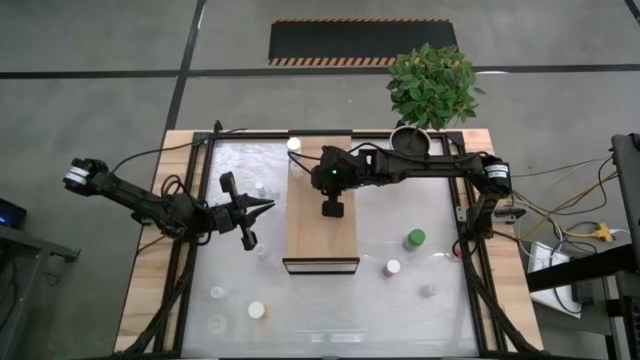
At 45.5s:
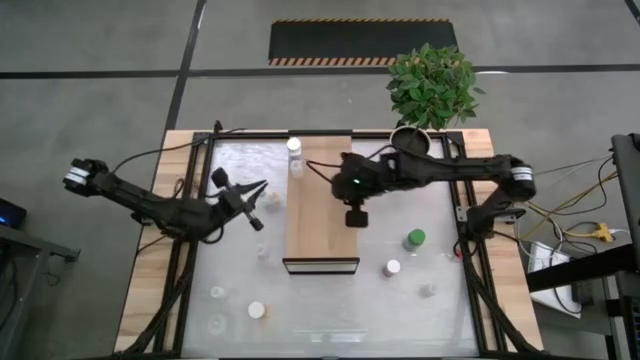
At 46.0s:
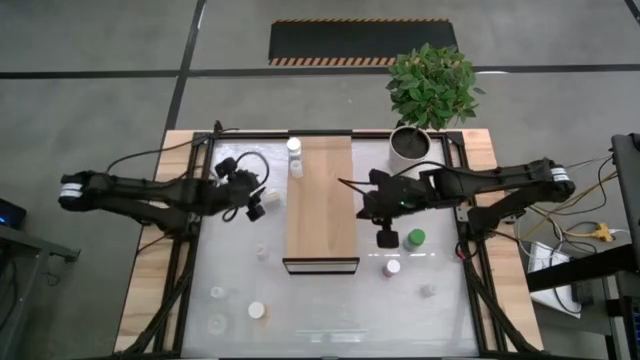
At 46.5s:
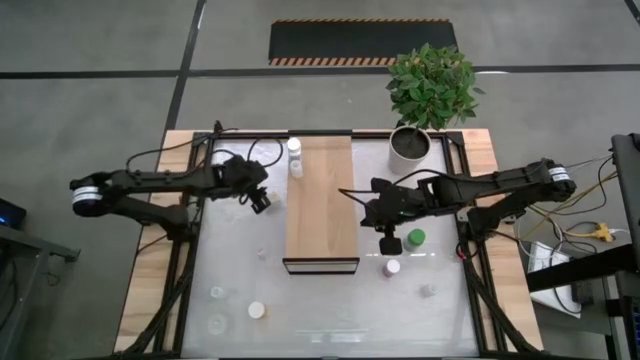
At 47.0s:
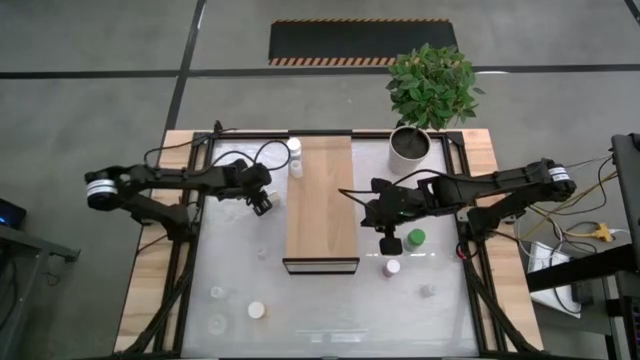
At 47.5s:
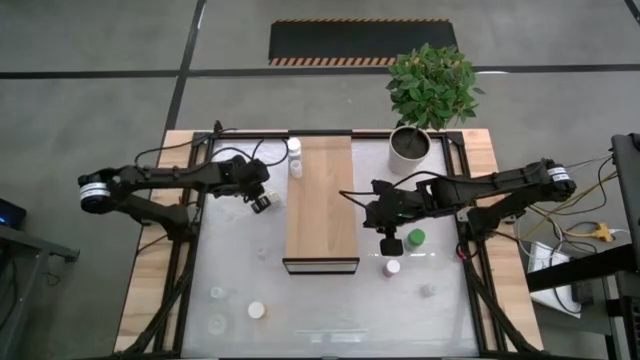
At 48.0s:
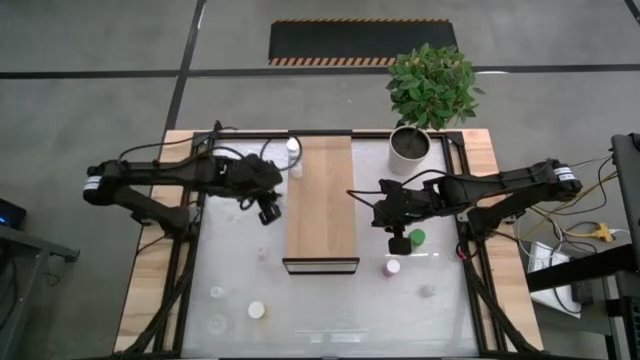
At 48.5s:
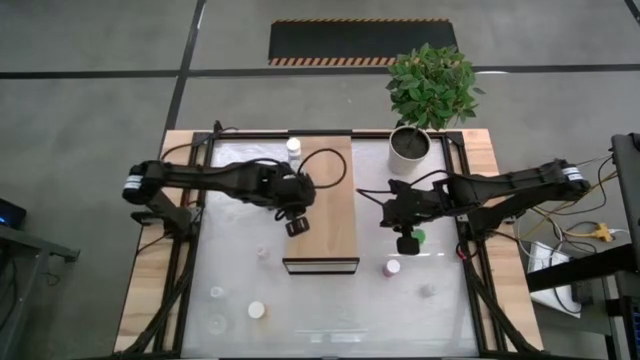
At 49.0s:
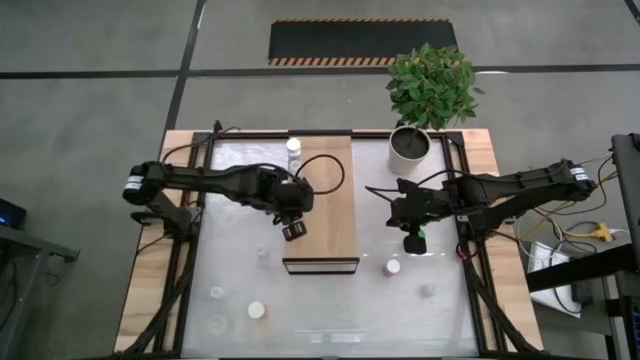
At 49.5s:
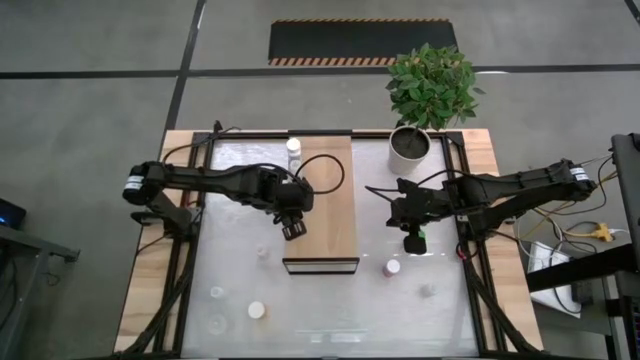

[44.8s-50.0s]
Task: Pick and place medicine bottles onto shelf by color
Put the blue pill bottle on the shelf

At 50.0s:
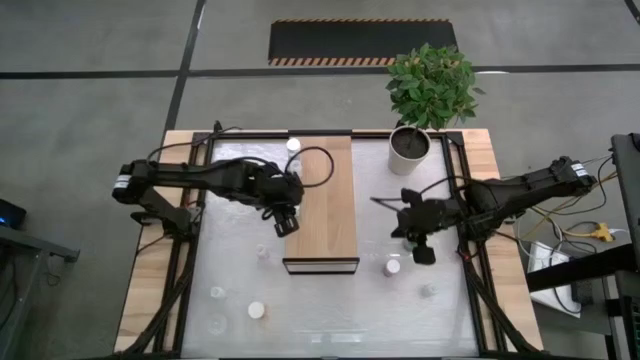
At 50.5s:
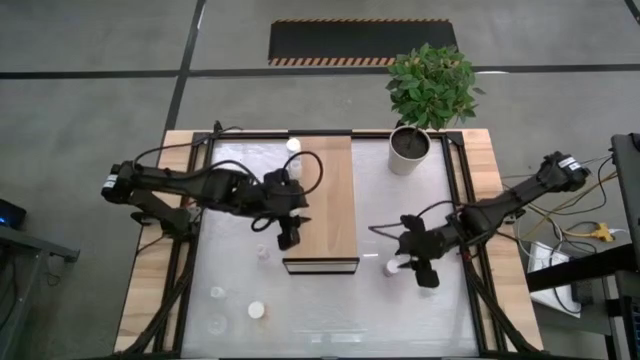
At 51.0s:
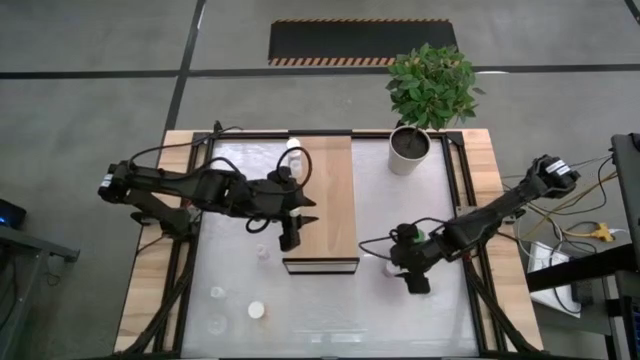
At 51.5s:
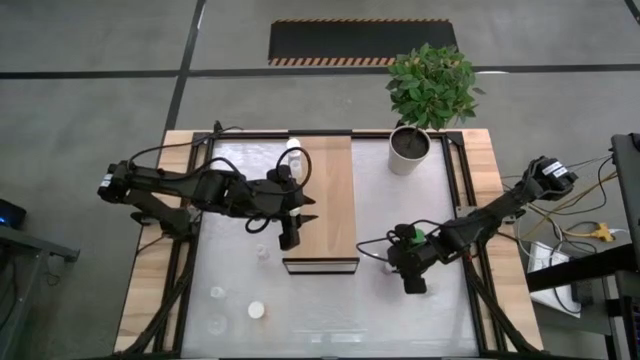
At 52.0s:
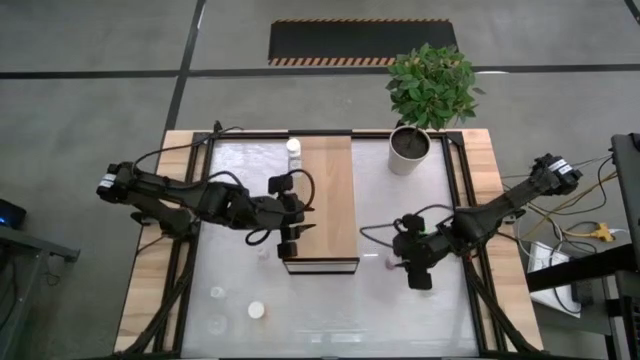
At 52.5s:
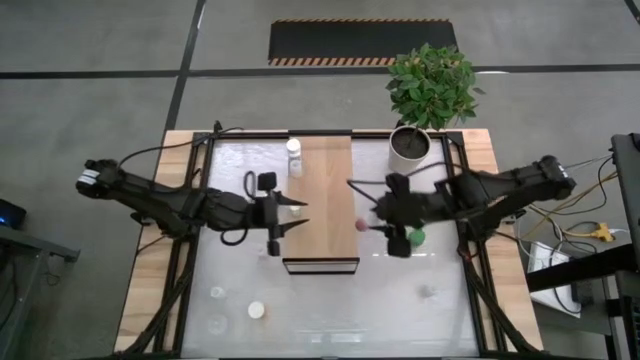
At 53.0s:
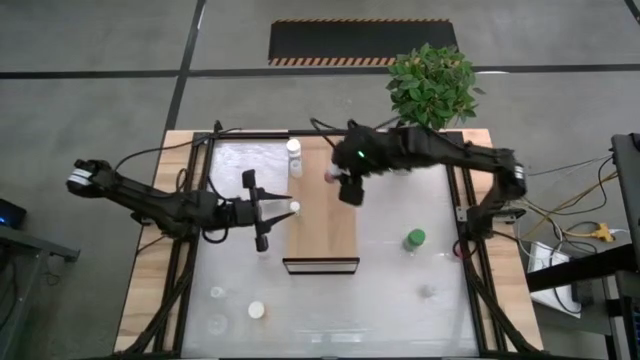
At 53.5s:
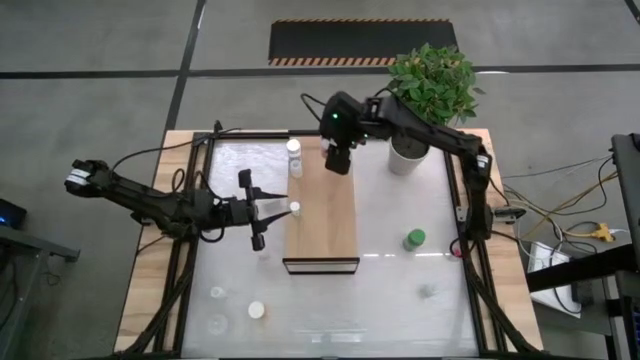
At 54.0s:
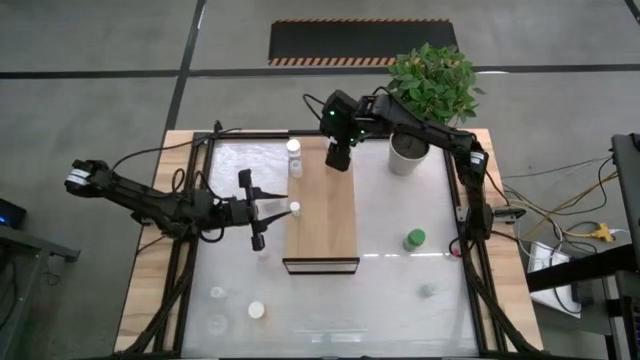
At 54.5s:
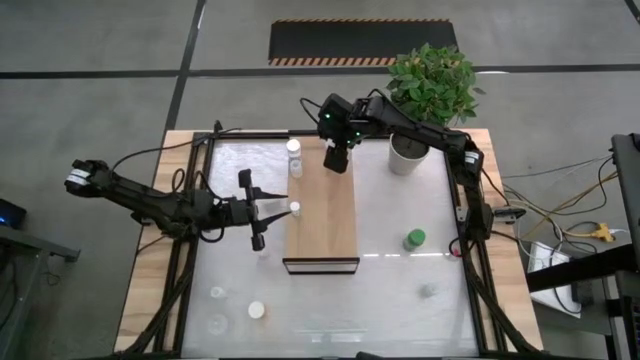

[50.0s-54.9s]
Put the pink pill bottle on the shelf

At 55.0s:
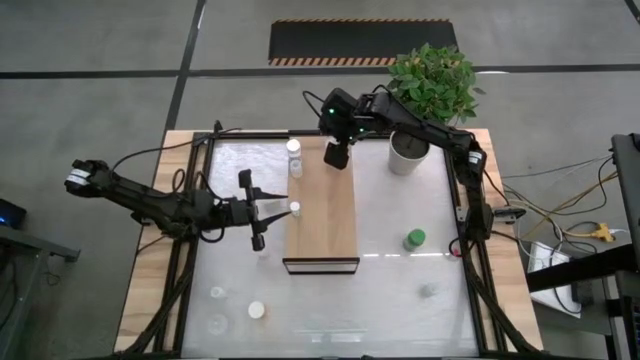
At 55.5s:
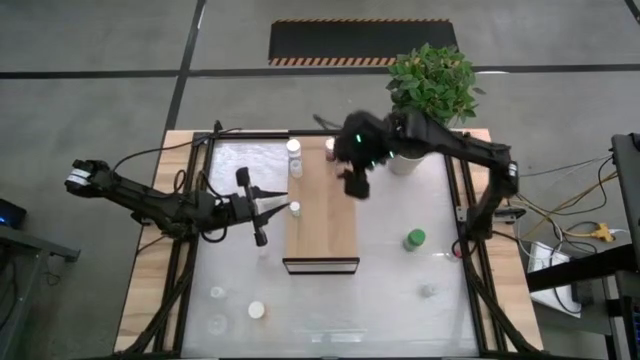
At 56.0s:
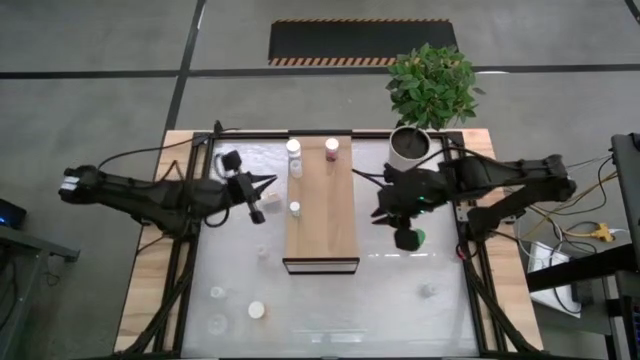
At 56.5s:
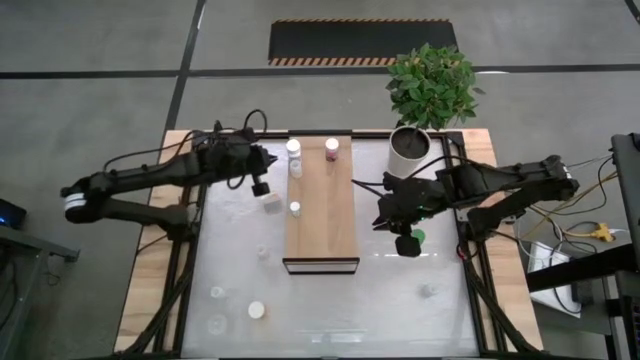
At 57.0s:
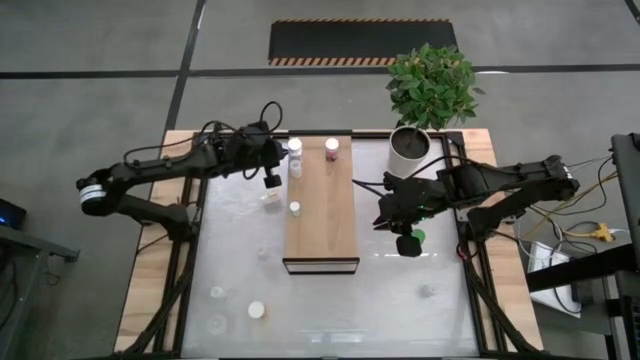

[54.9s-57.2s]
Adjust the blue pill bottle on the shelf

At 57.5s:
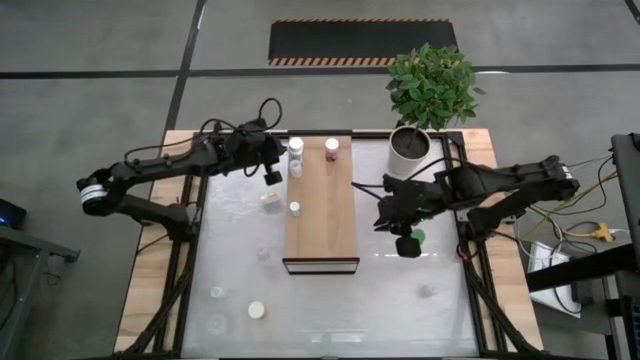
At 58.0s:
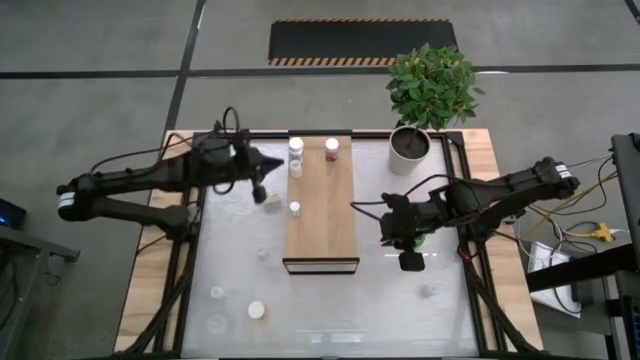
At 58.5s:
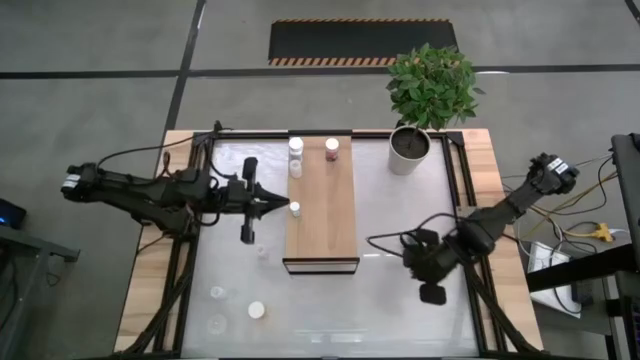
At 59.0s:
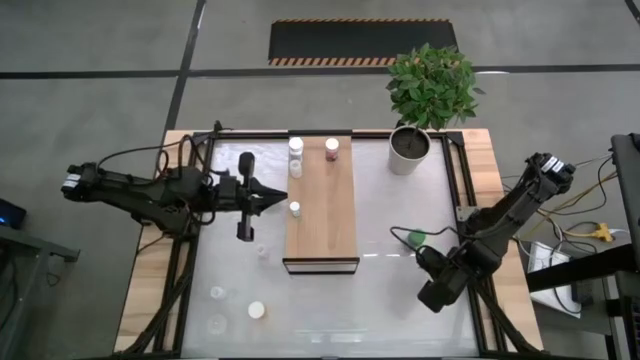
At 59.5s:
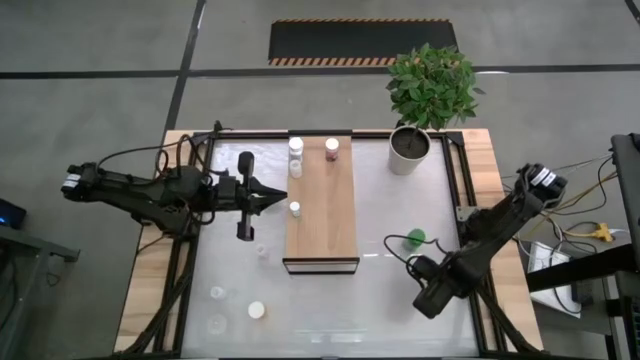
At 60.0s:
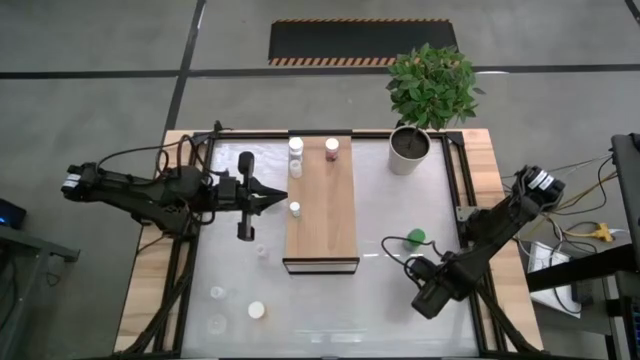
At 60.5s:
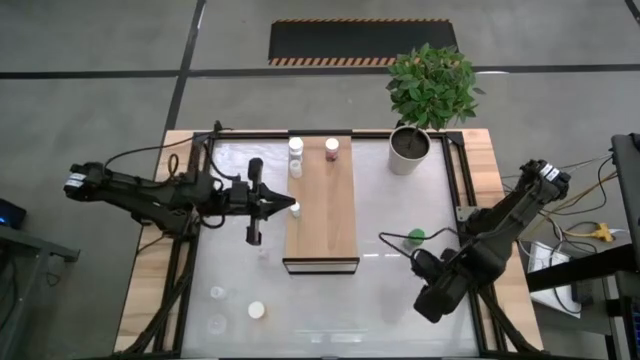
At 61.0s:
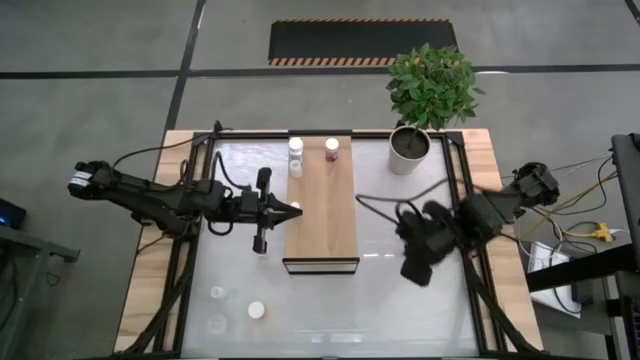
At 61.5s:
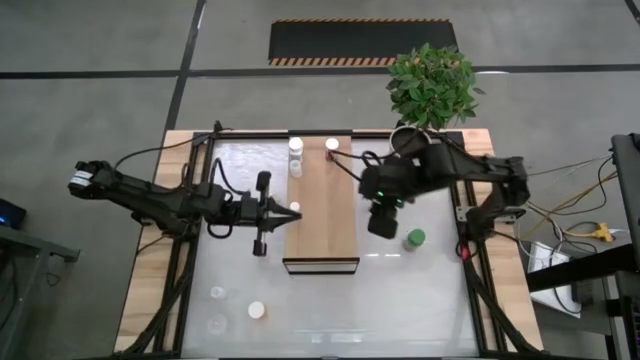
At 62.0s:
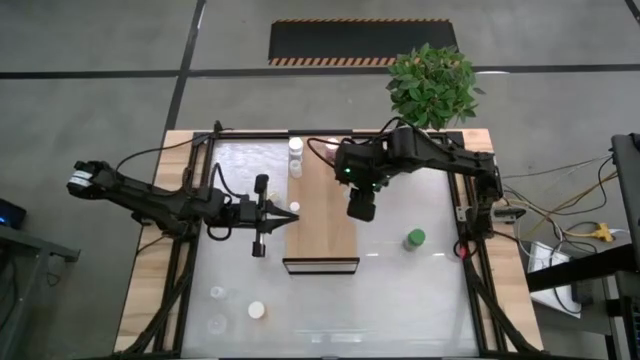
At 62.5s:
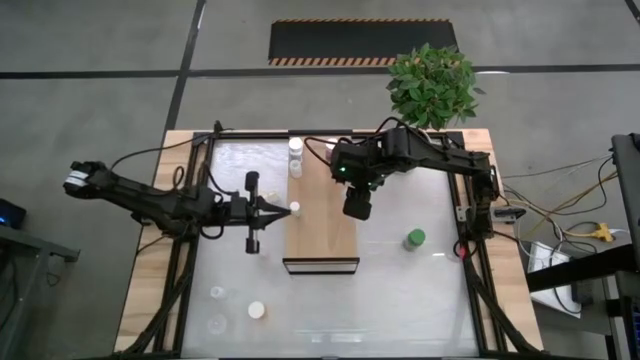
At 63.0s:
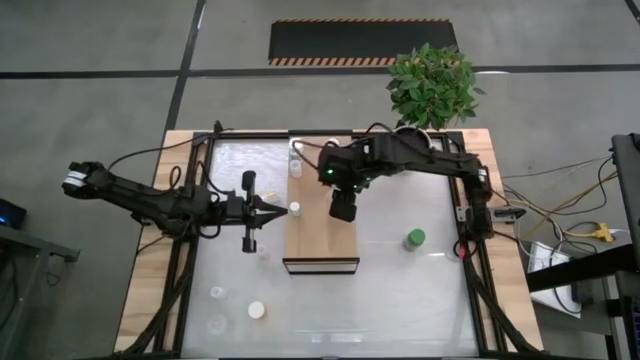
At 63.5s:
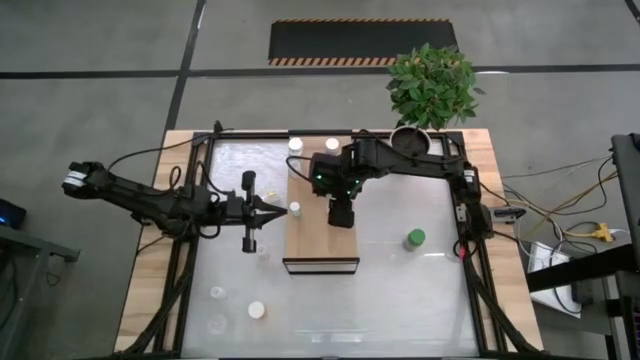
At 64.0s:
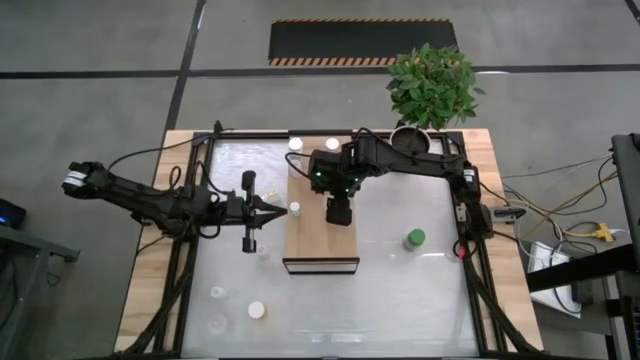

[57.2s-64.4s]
Put the yellow pill bottle on the shelf

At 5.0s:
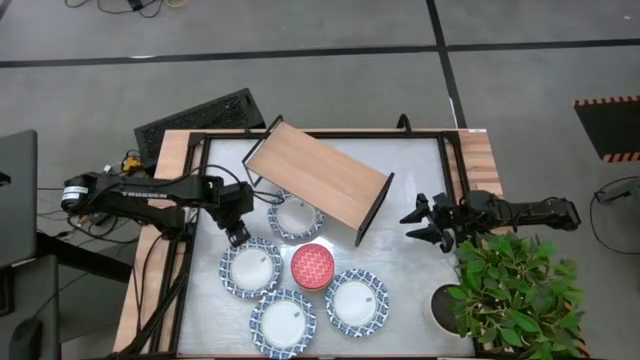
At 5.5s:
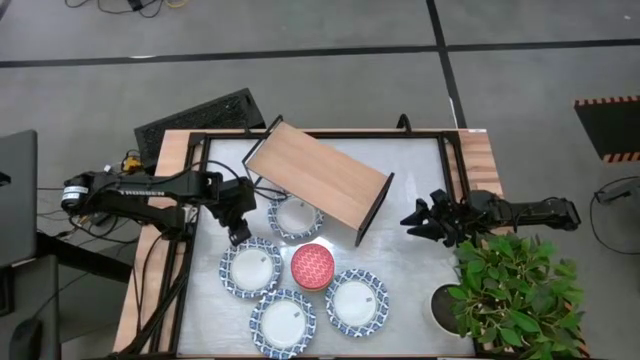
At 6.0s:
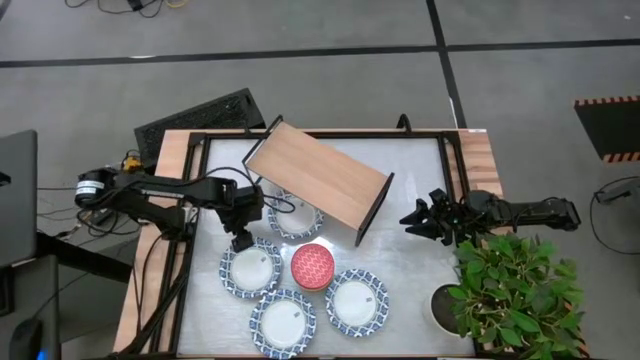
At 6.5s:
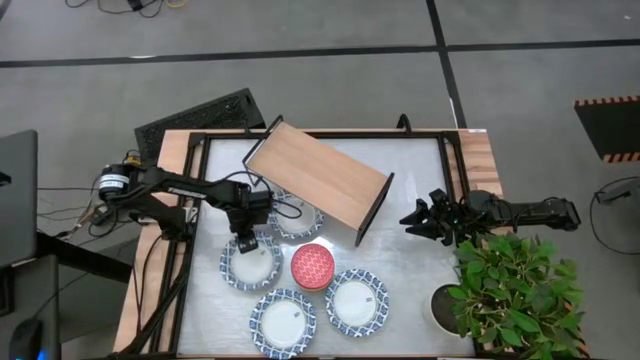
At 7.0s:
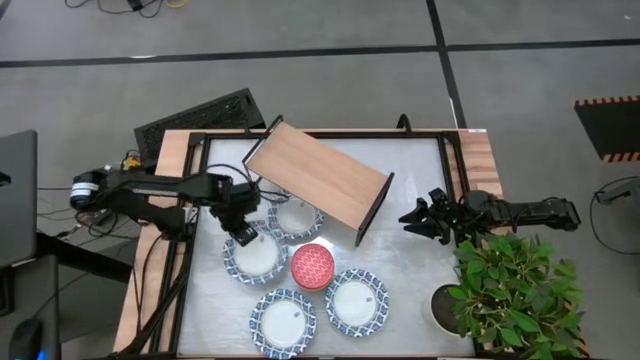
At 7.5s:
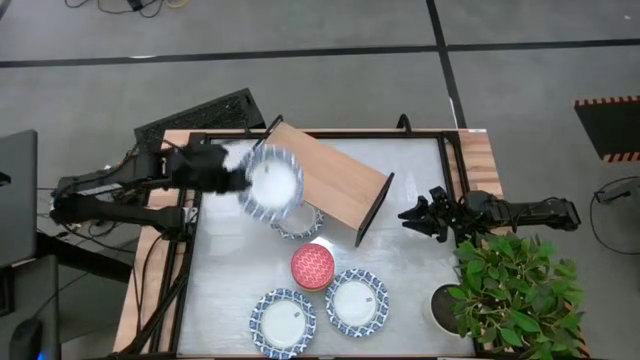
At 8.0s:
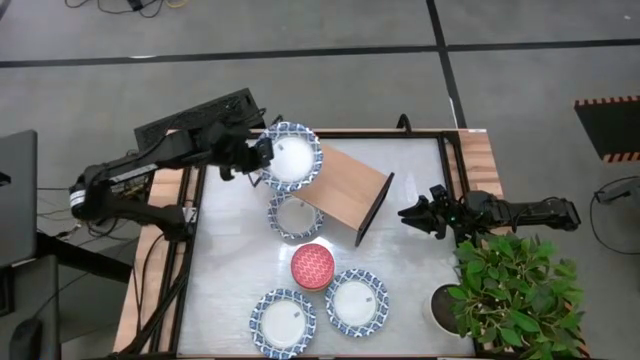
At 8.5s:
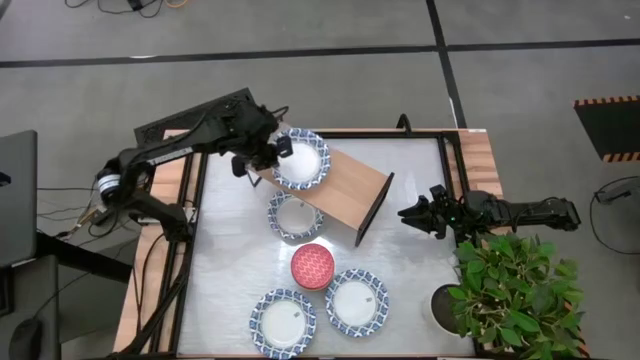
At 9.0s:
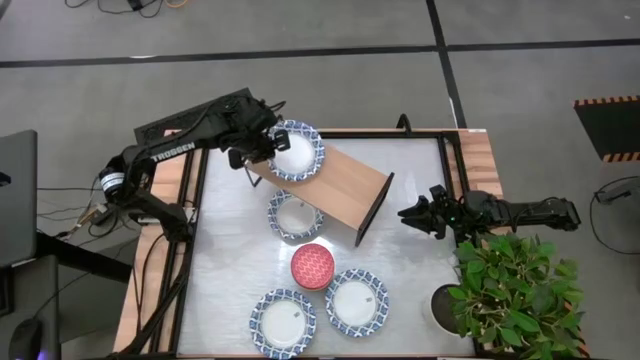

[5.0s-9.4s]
Task: Place and stack bowls onto a shelf
Put the left white bowl to the left on the shelf
